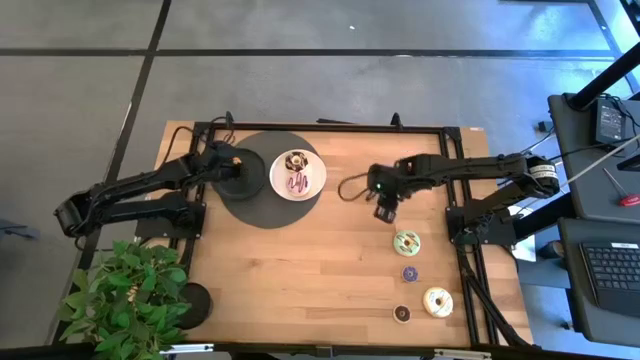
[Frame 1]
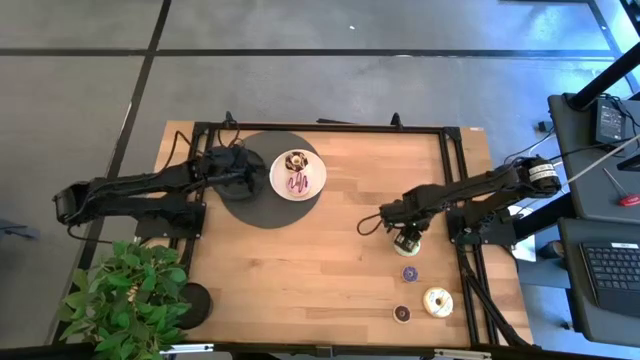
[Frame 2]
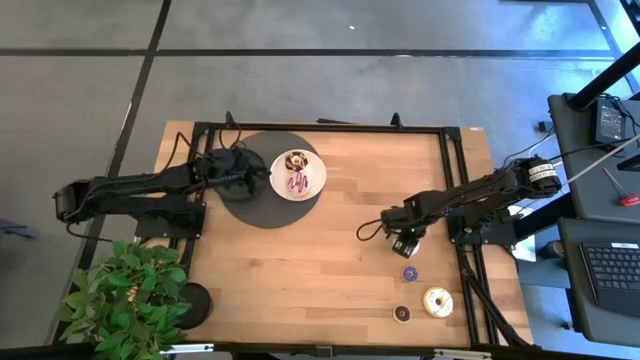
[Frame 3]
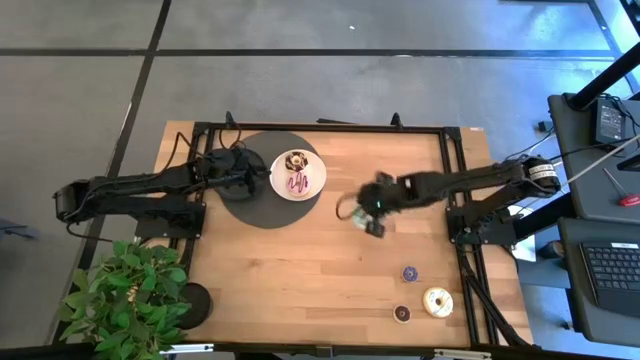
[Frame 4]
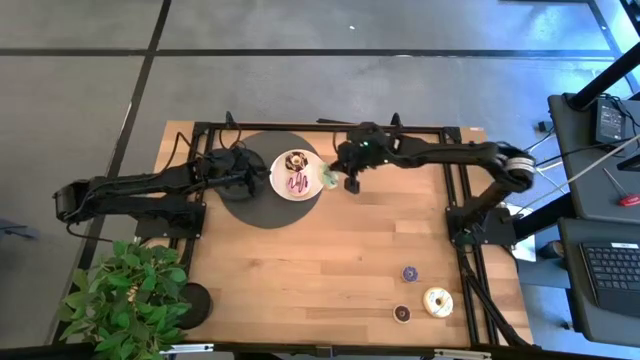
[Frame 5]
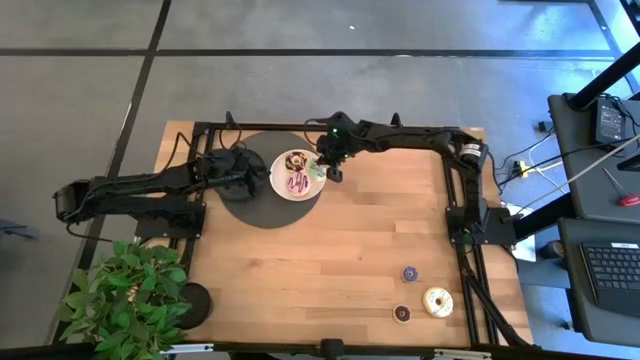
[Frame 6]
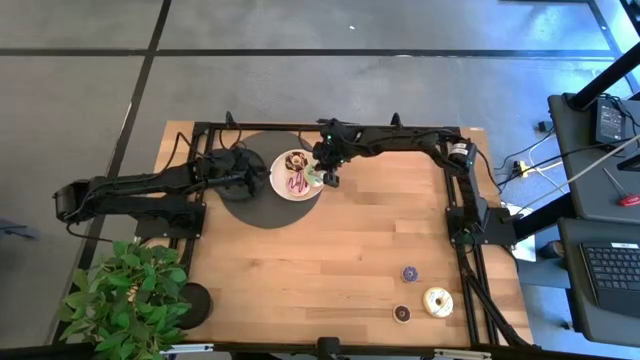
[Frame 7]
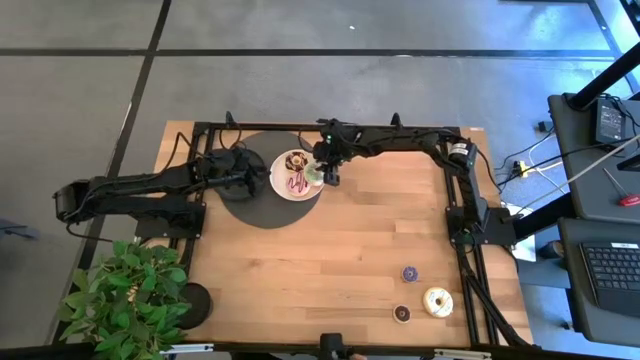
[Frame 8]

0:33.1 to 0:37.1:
Task: Pick & Place donuts
Put the big blue donut on the white plate

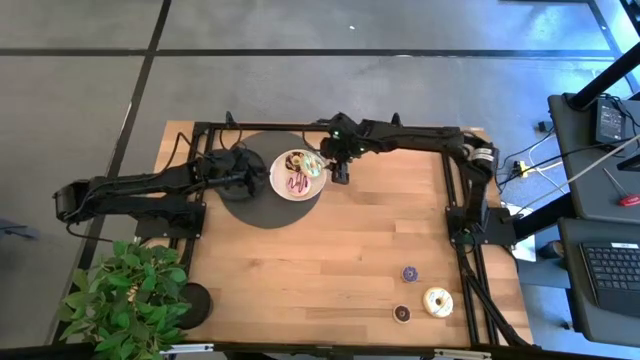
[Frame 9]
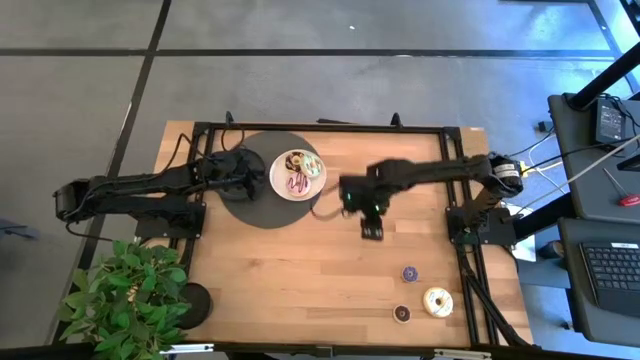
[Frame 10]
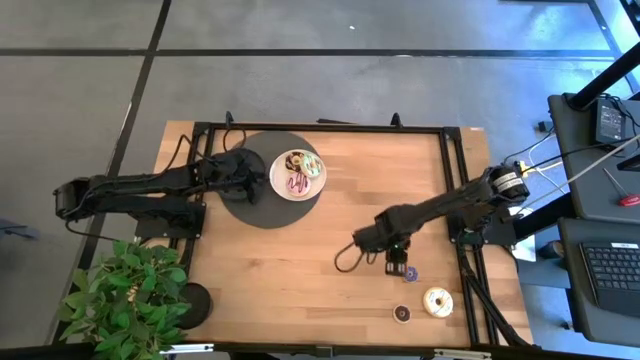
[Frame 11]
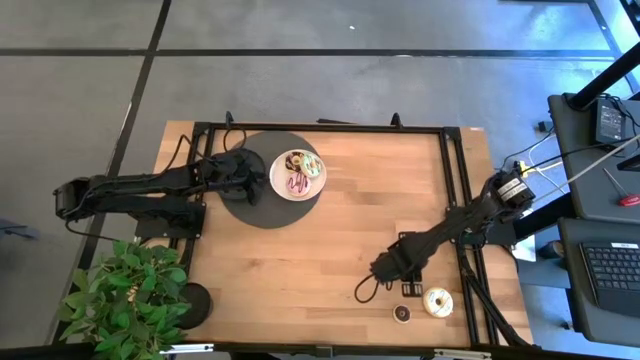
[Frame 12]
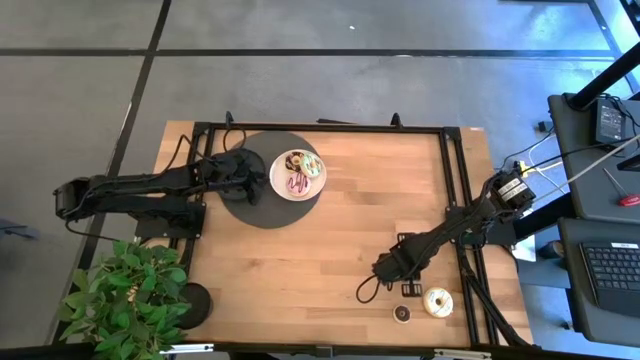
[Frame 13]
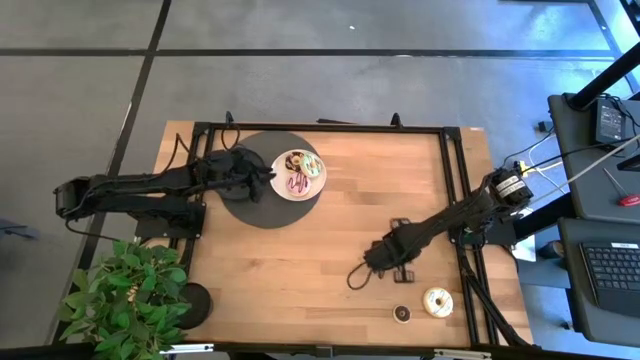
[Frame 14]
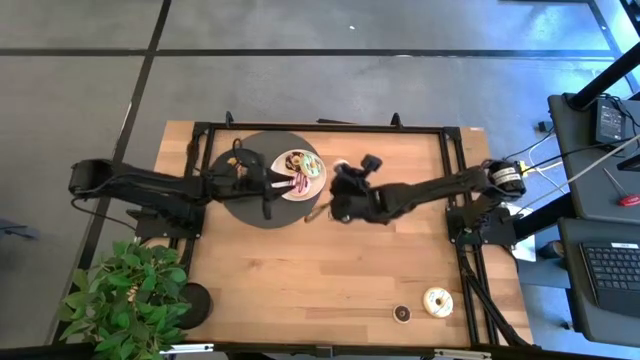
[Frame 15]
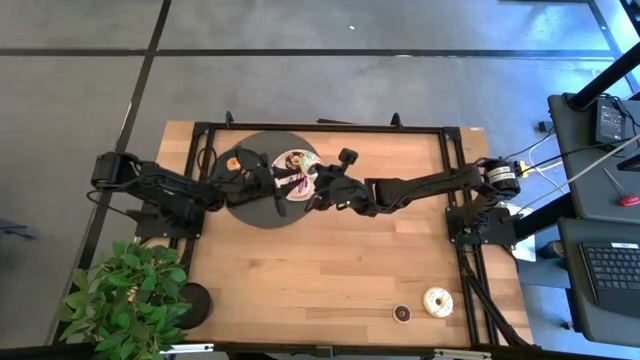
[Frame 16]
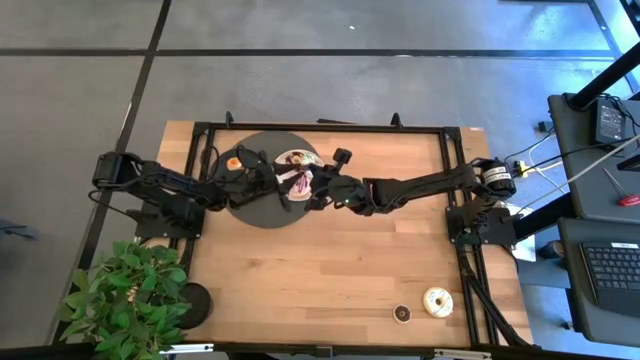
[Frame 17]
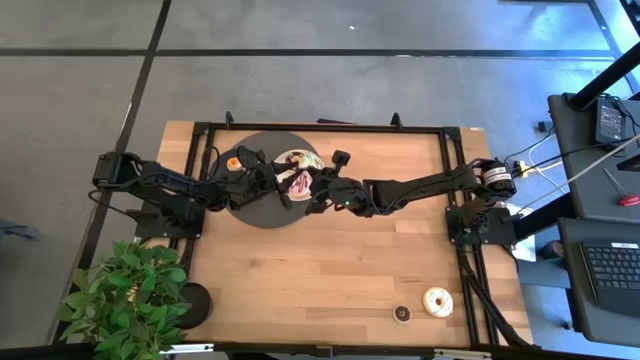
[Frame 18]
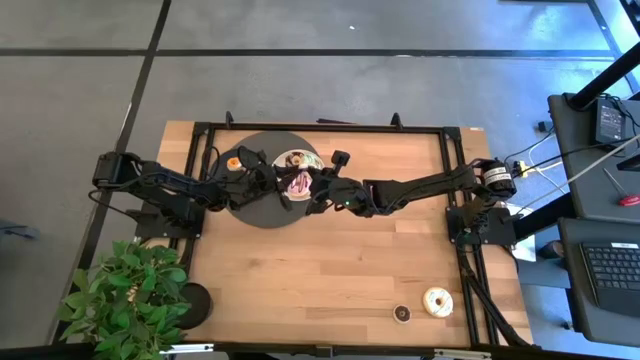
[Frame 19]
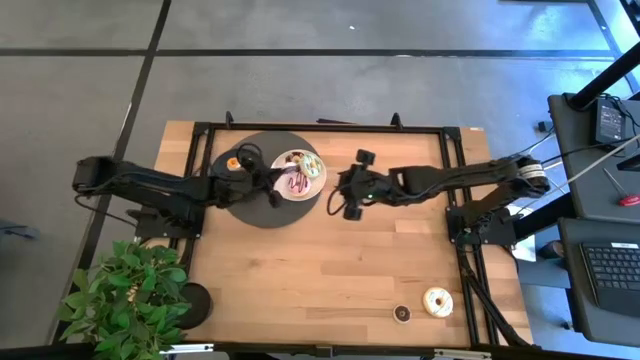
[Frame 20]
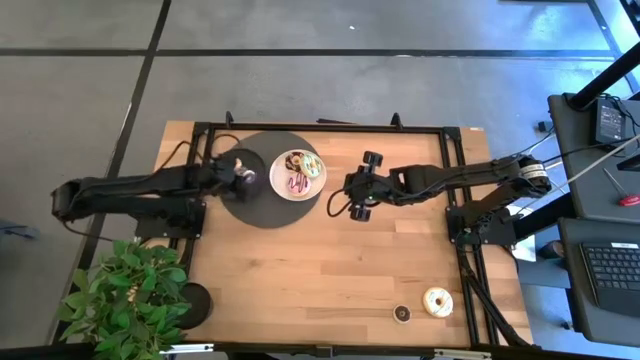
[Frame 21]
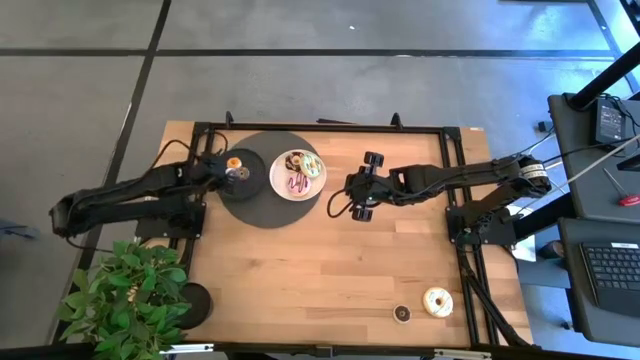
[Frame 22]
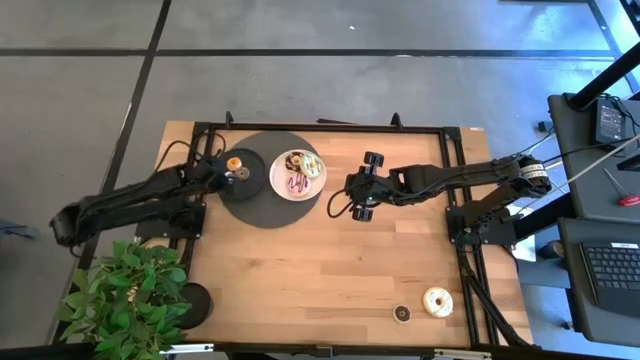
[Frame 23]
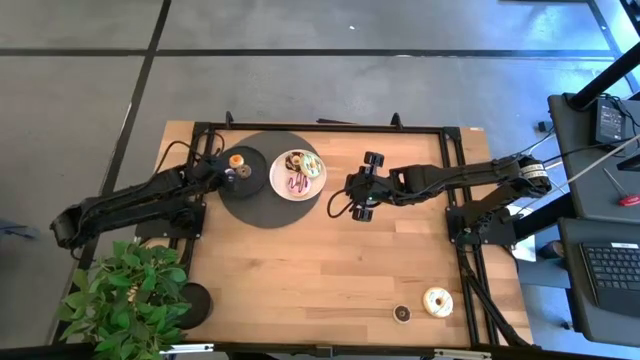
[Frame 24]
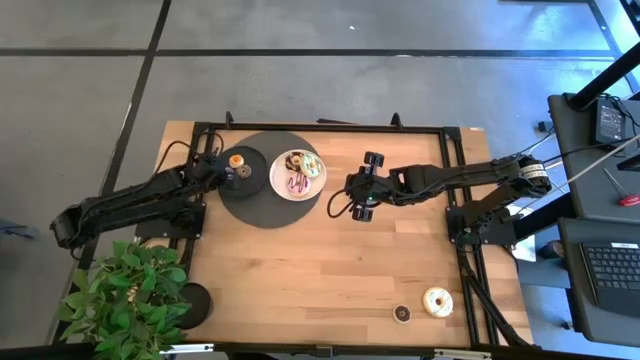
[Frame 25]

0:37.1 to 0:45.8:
Put the small violet donut on the black plate

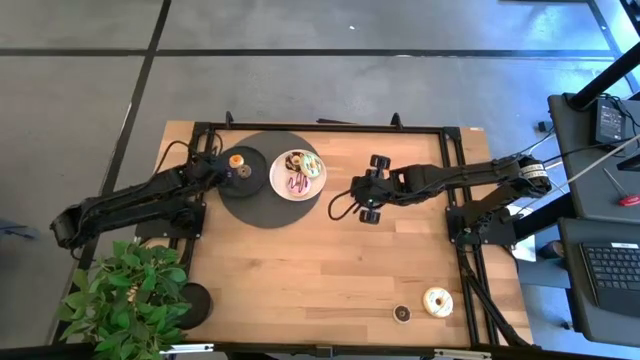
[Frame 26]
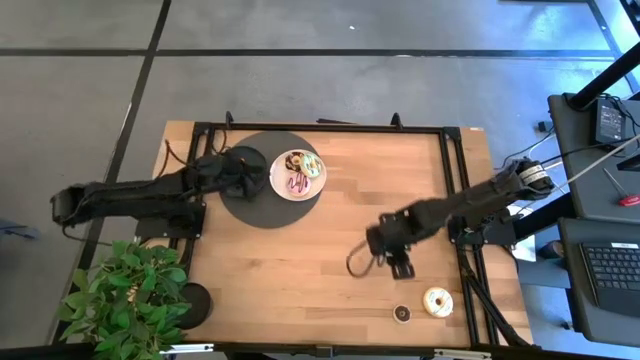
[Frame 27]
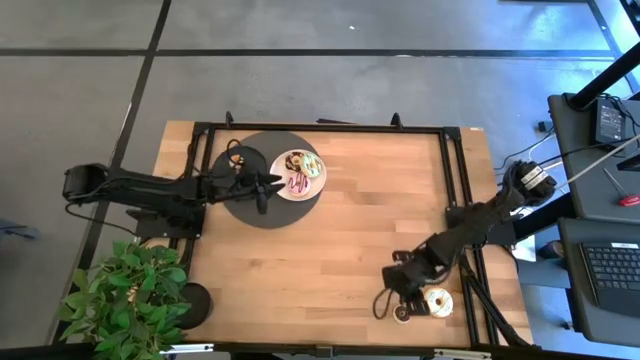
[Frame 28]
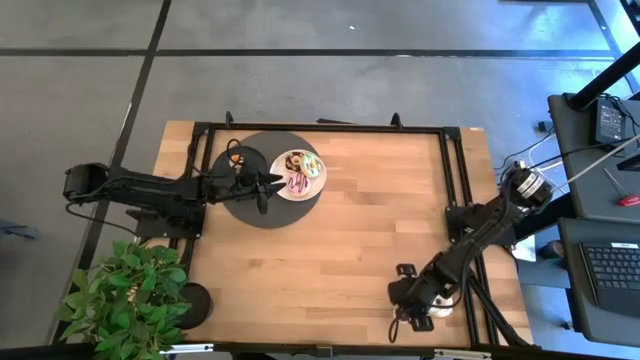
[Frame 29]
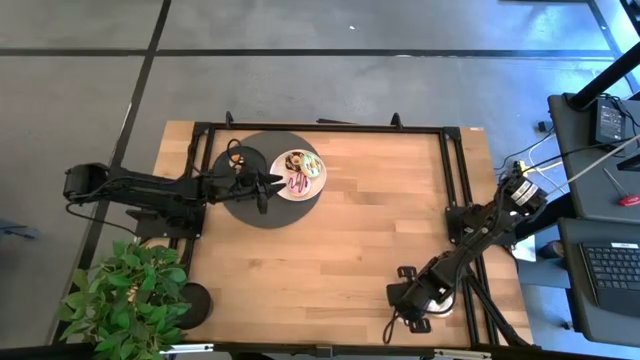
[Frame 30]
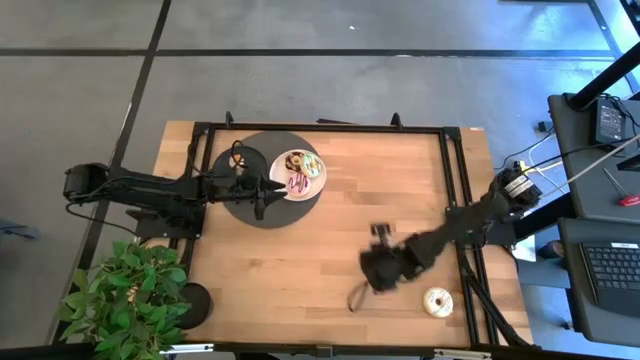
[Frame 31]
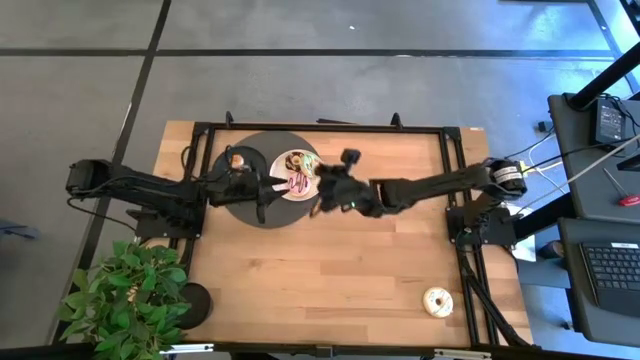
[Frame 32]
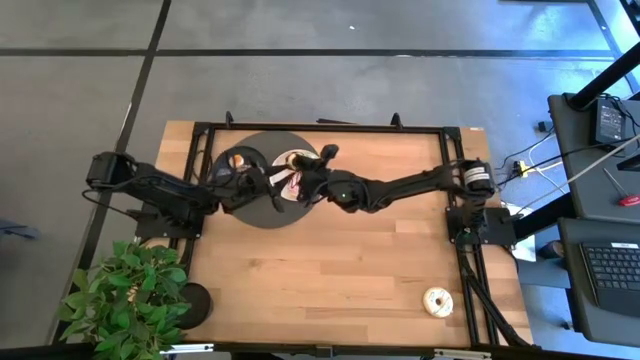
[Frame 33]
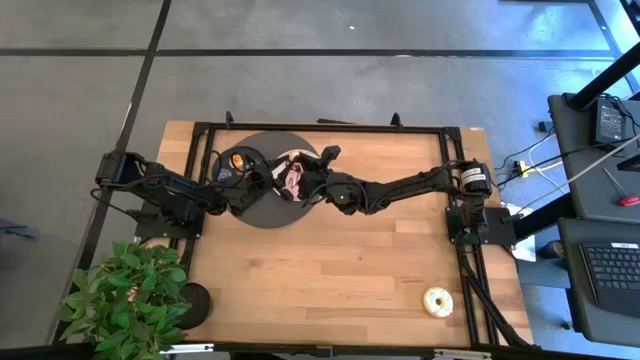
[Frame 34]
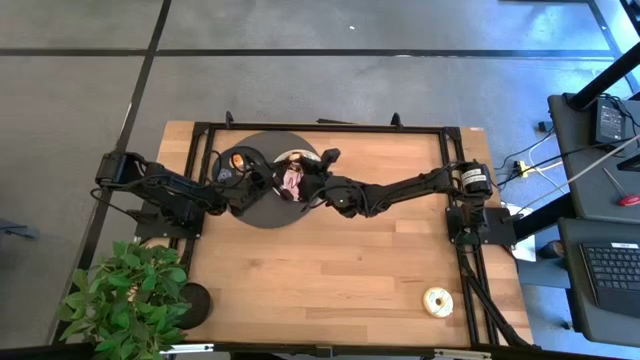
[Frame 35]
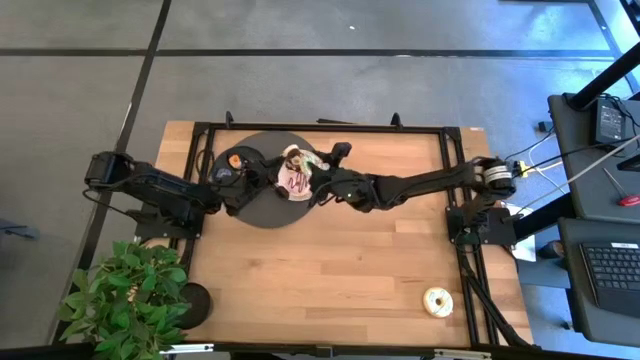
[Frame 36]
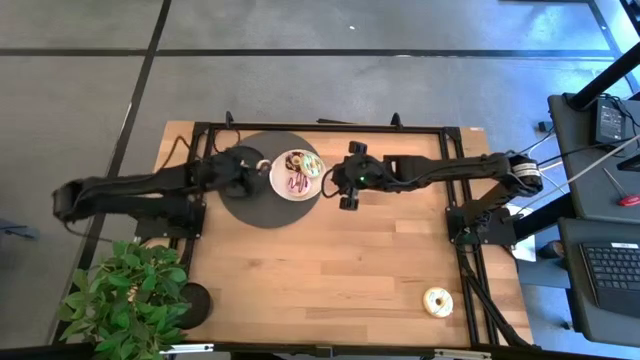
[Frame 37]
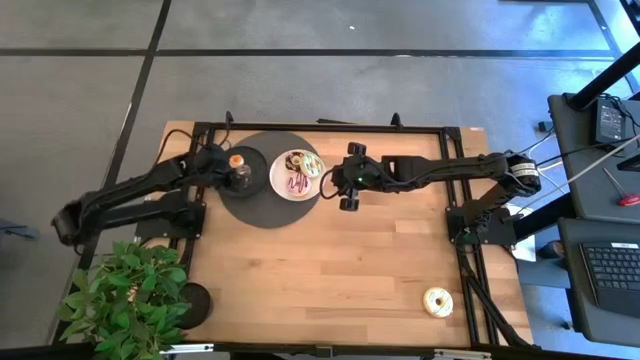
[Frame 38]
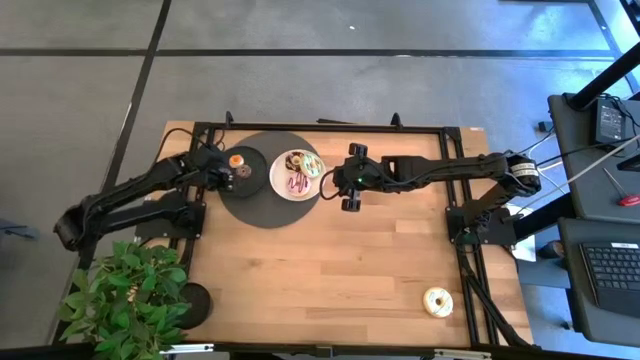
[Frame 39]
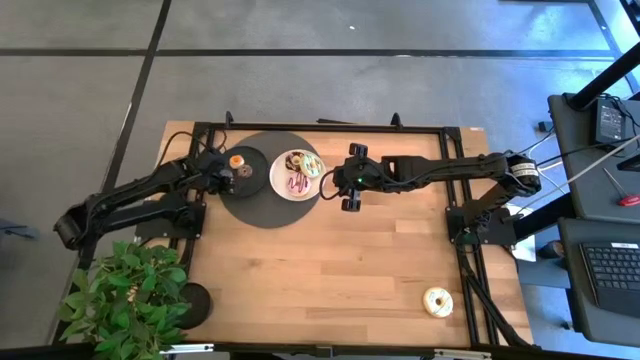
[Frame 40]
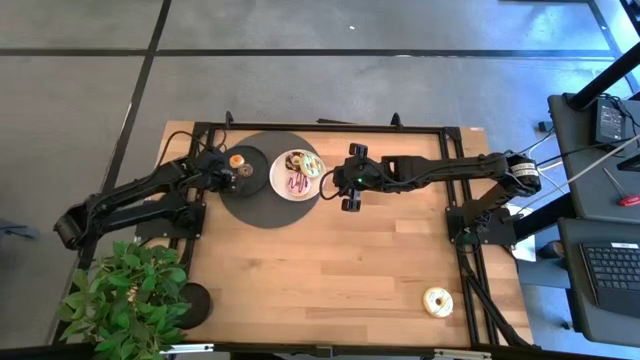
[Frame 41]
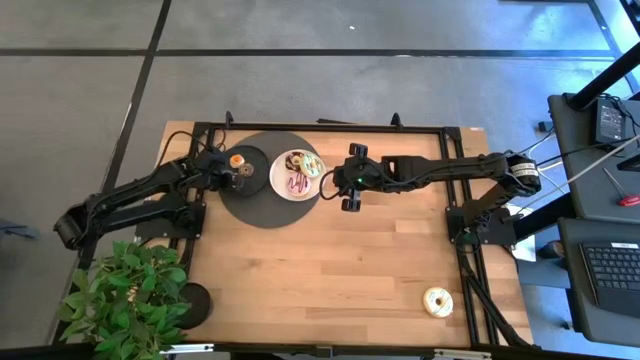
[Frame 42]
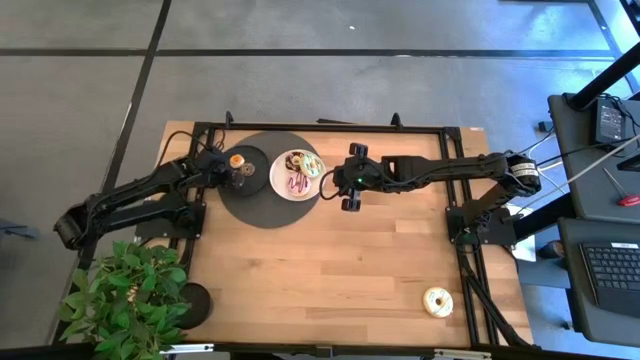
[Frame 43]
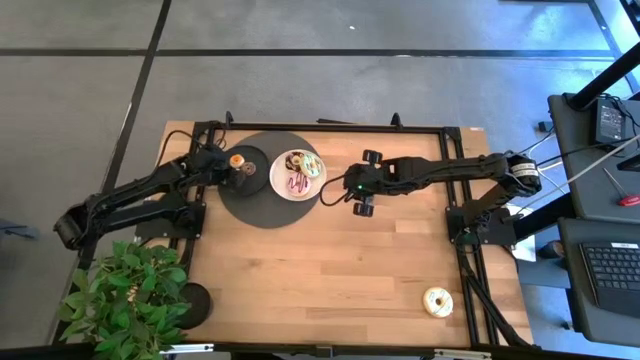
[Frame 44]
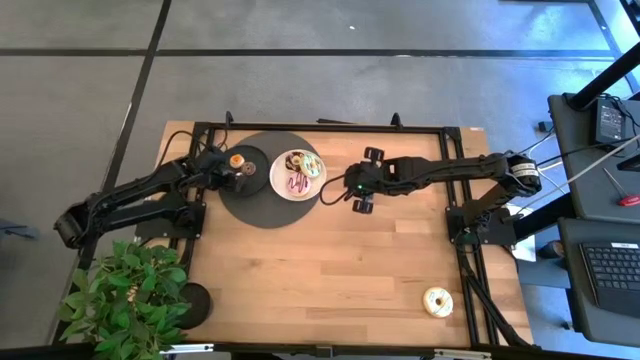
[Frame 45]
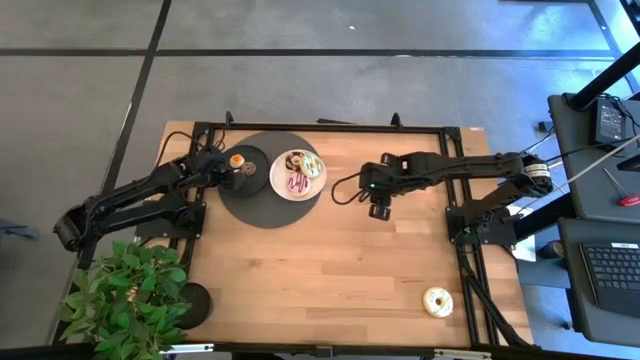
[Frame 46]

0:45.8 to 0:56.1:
Put the small dark brown donut on the black plate
